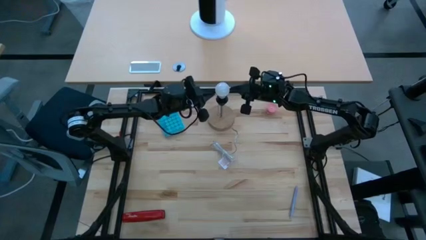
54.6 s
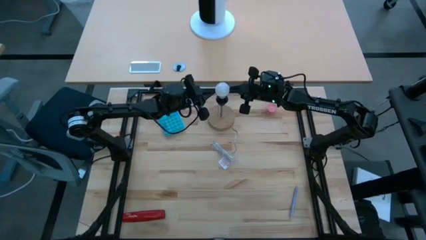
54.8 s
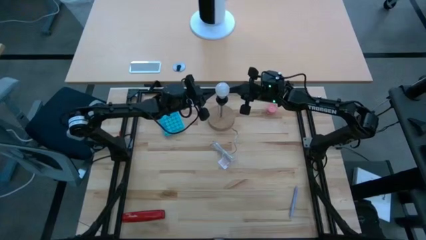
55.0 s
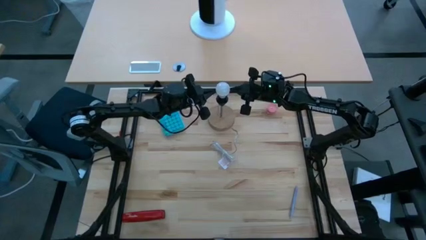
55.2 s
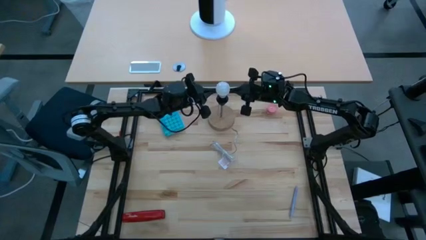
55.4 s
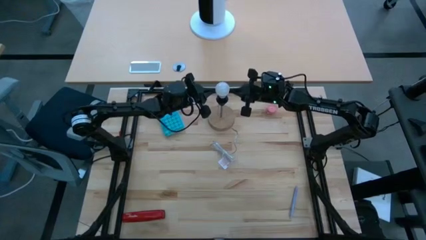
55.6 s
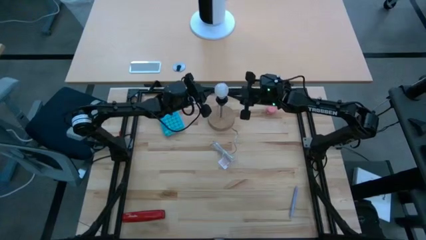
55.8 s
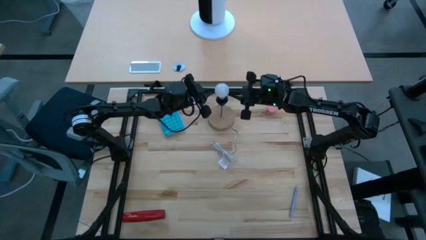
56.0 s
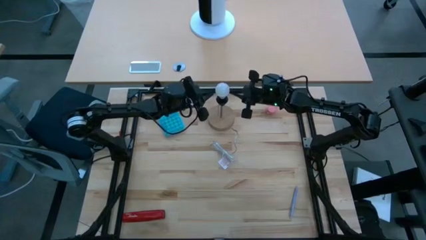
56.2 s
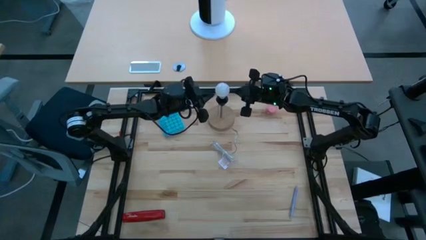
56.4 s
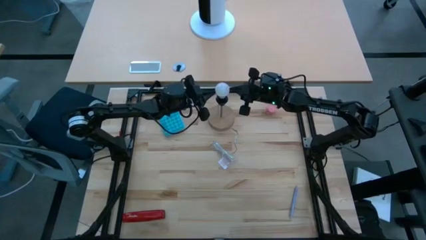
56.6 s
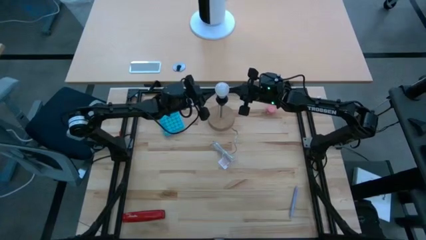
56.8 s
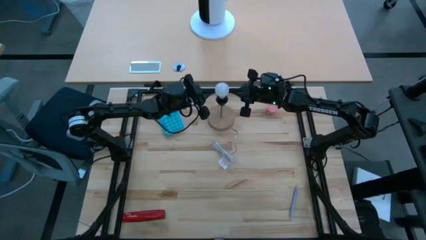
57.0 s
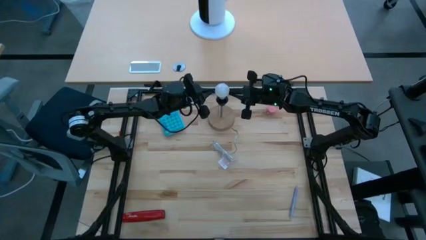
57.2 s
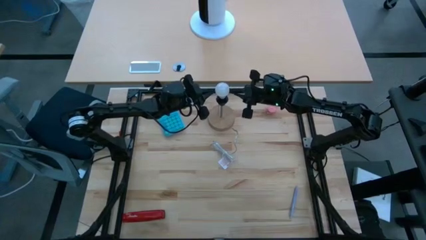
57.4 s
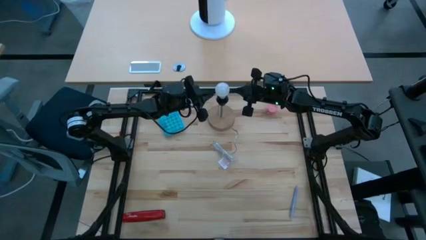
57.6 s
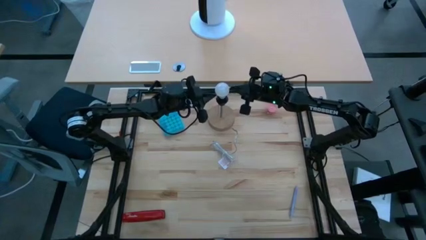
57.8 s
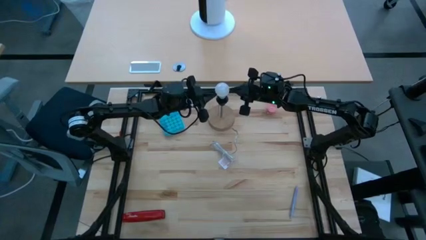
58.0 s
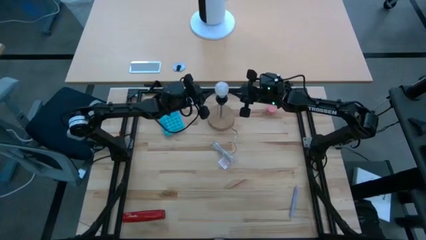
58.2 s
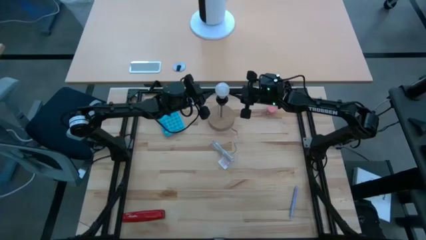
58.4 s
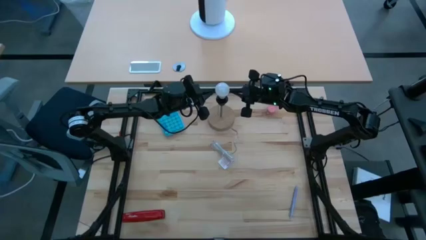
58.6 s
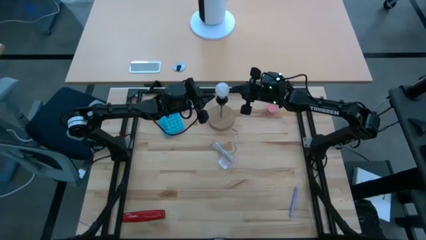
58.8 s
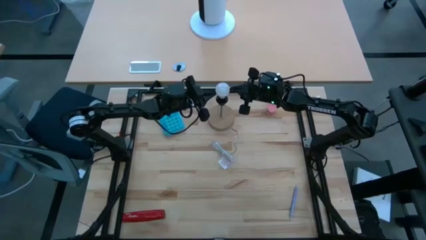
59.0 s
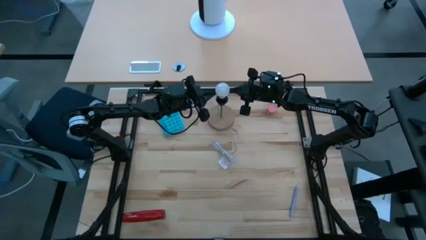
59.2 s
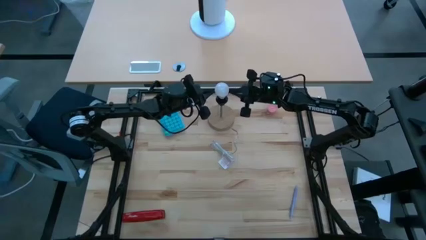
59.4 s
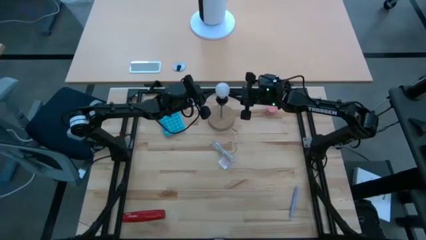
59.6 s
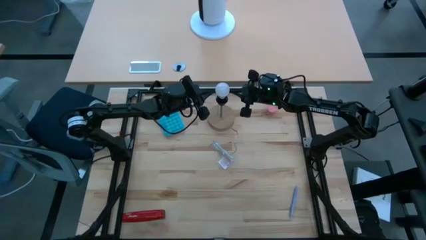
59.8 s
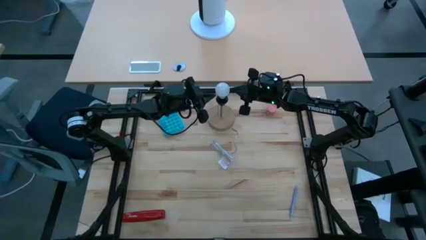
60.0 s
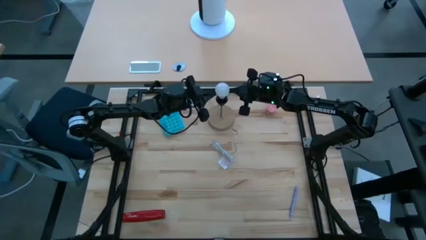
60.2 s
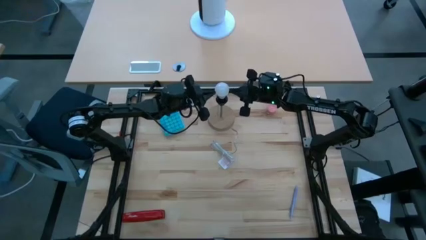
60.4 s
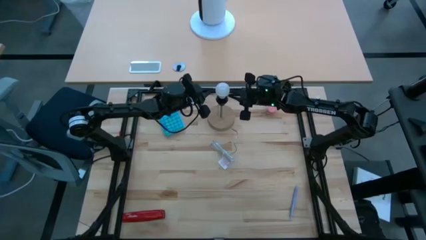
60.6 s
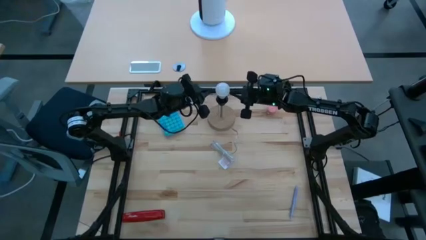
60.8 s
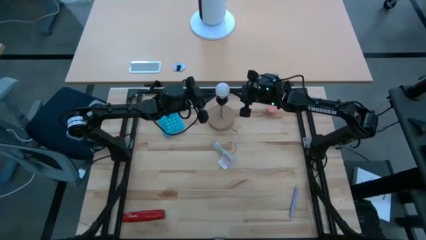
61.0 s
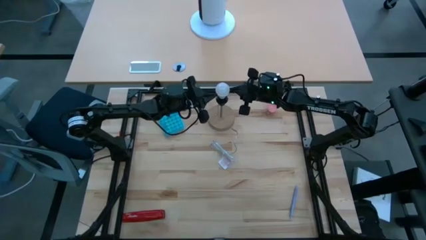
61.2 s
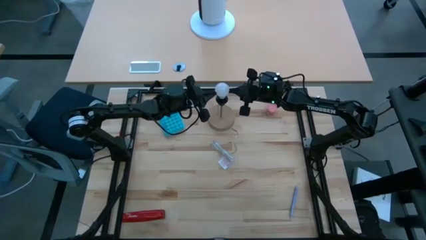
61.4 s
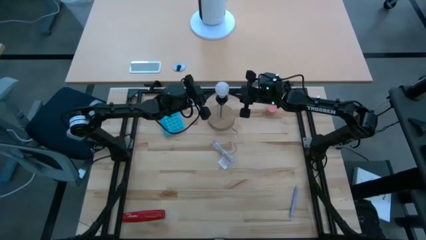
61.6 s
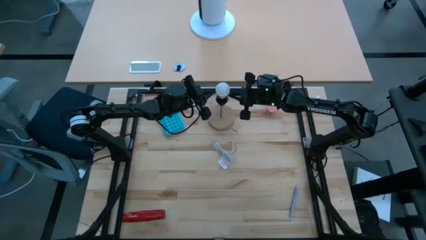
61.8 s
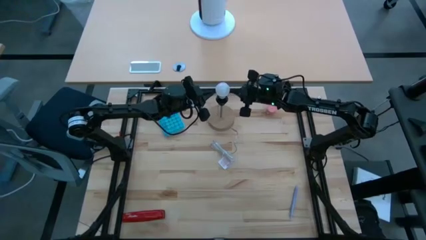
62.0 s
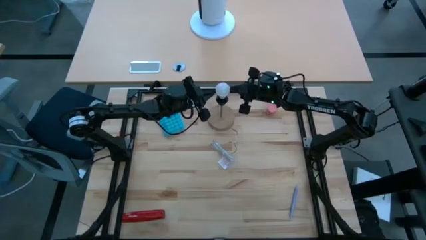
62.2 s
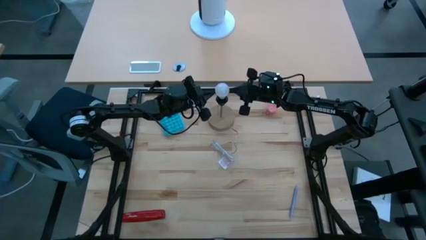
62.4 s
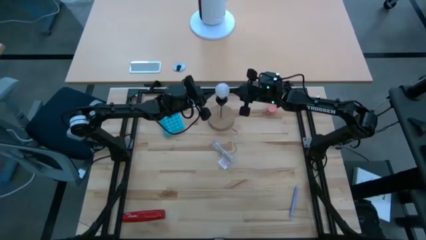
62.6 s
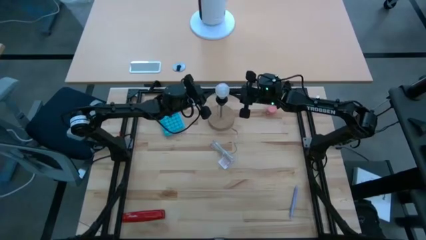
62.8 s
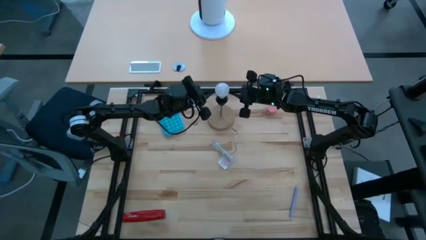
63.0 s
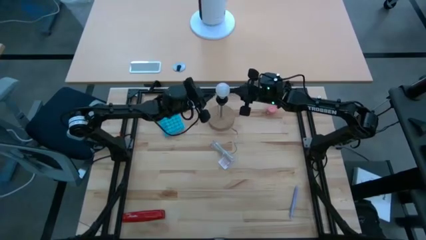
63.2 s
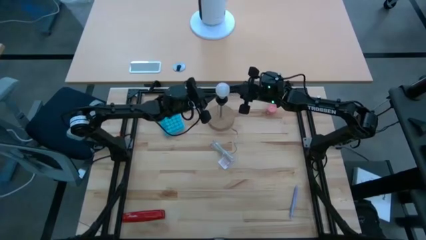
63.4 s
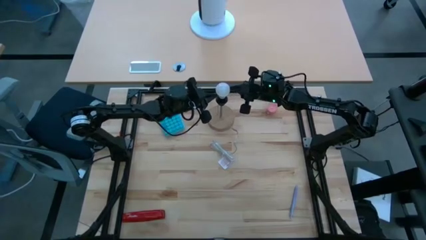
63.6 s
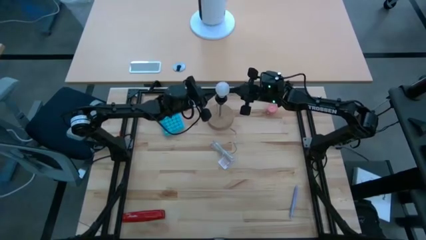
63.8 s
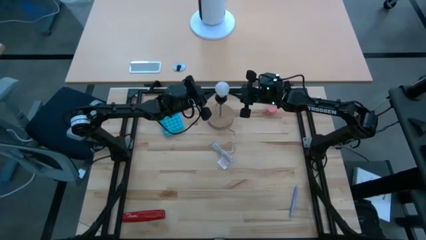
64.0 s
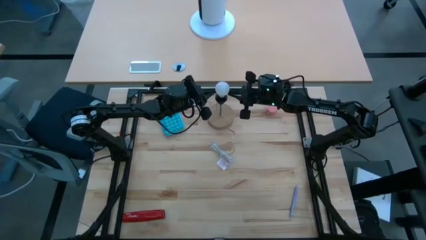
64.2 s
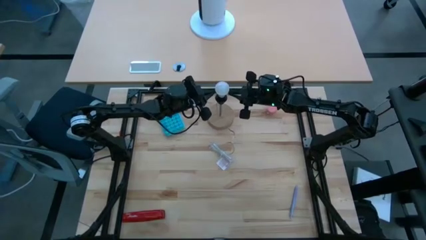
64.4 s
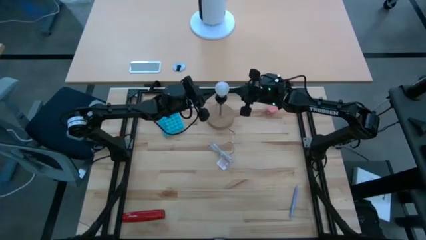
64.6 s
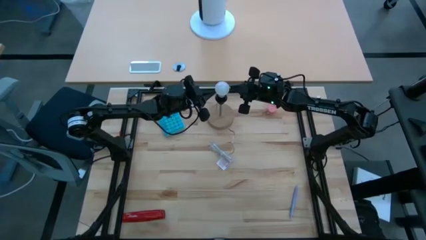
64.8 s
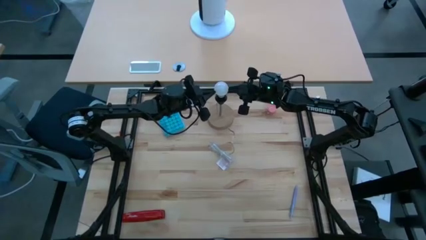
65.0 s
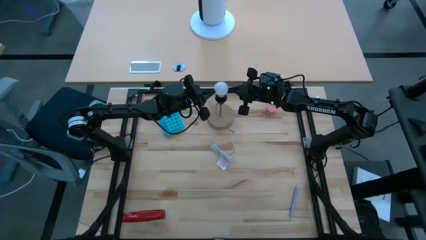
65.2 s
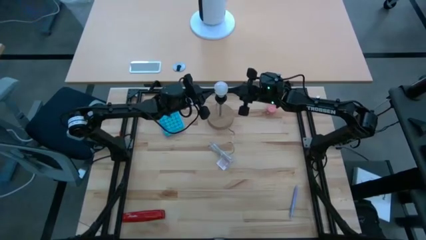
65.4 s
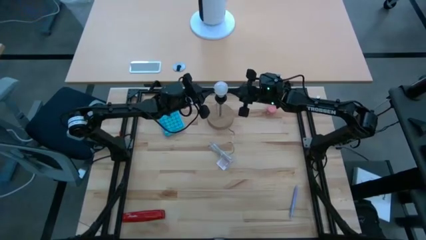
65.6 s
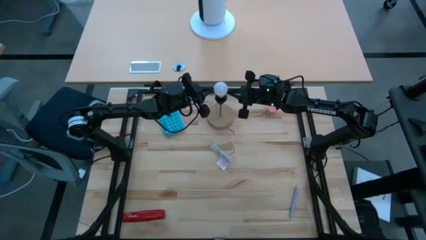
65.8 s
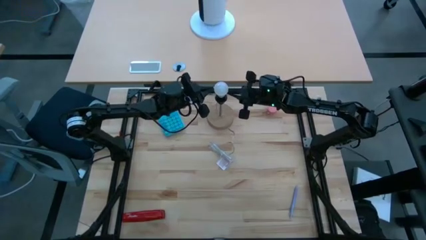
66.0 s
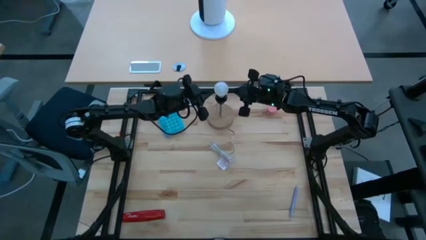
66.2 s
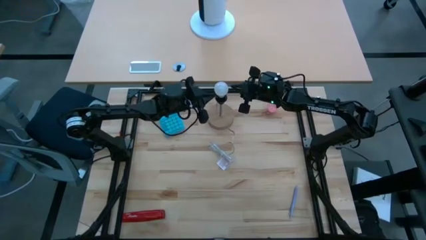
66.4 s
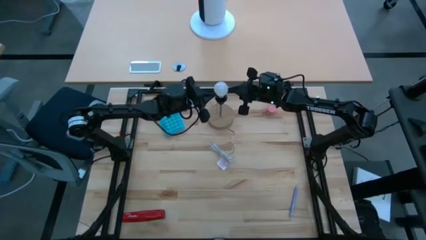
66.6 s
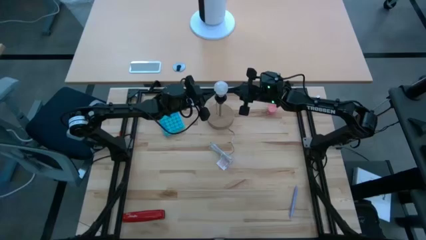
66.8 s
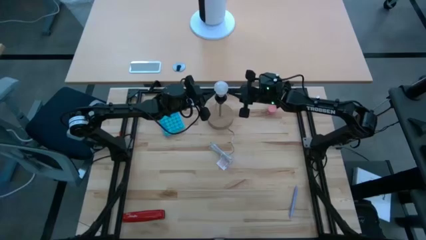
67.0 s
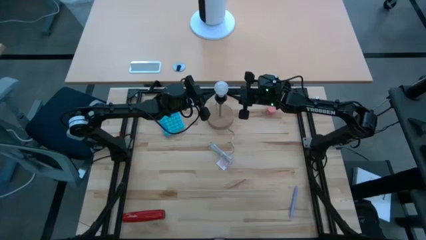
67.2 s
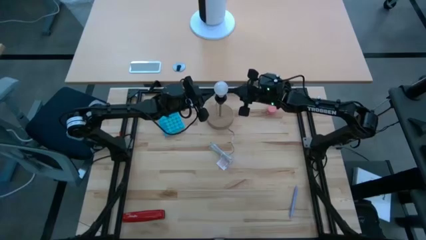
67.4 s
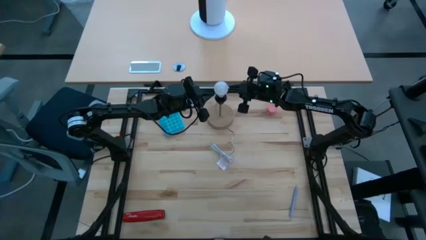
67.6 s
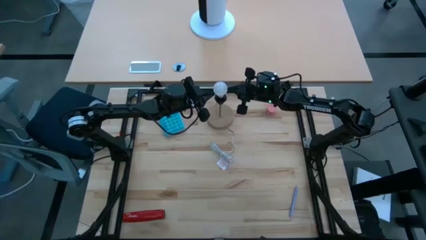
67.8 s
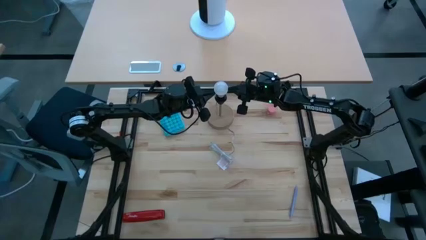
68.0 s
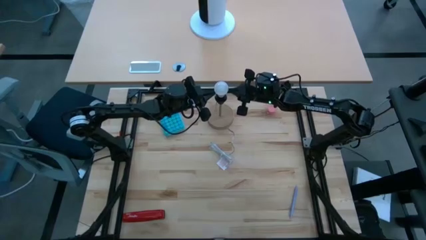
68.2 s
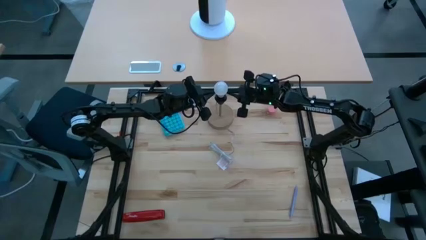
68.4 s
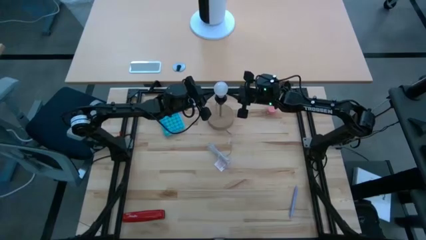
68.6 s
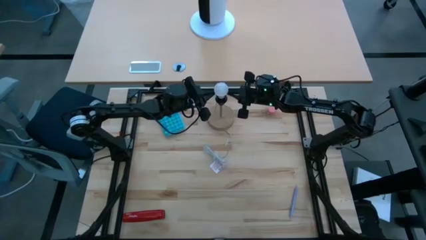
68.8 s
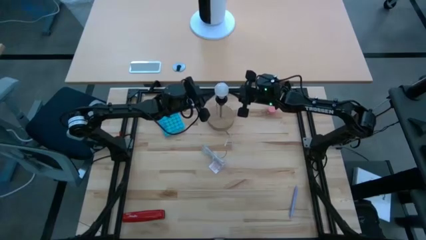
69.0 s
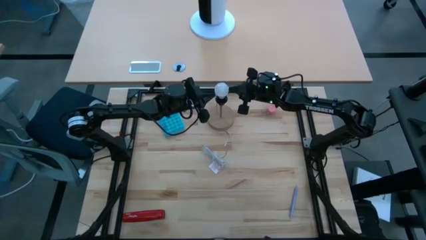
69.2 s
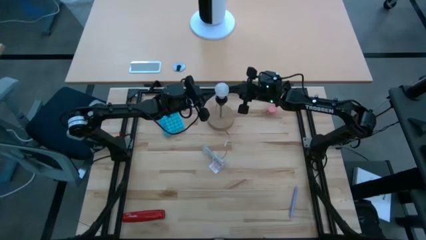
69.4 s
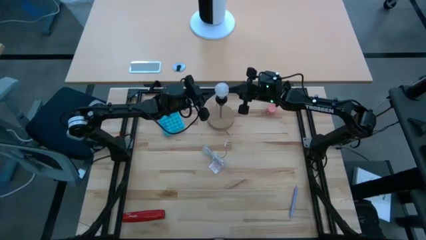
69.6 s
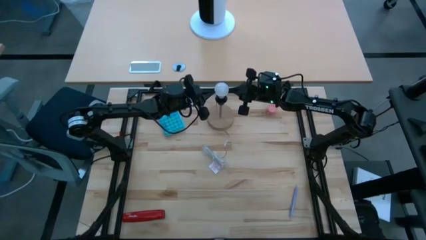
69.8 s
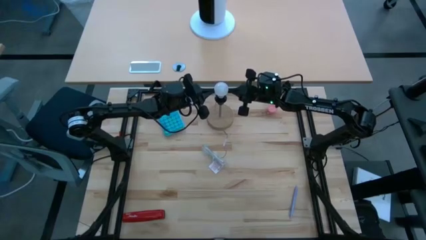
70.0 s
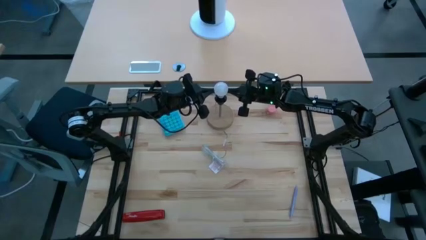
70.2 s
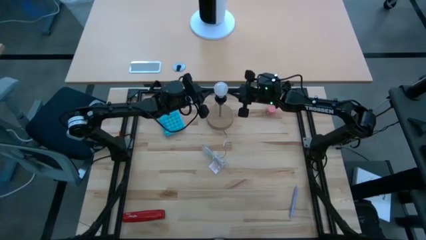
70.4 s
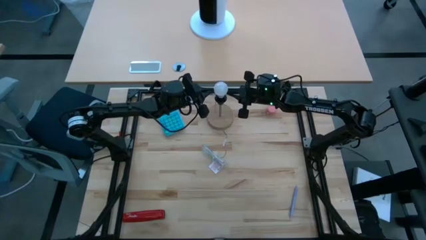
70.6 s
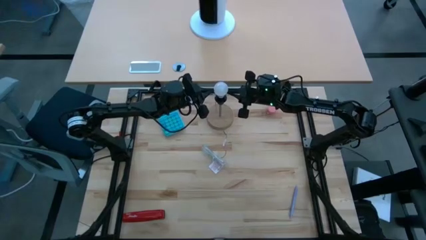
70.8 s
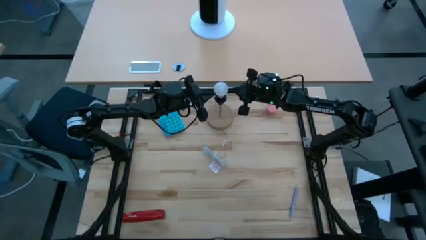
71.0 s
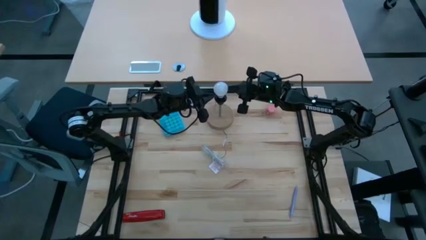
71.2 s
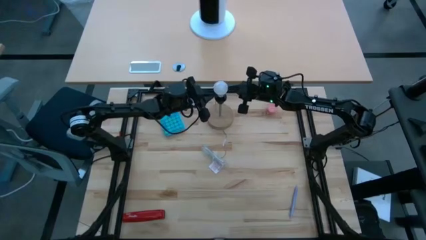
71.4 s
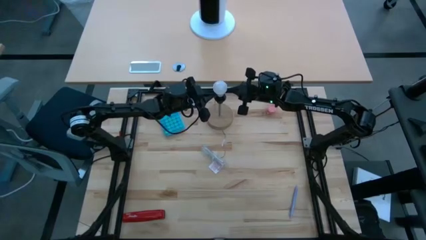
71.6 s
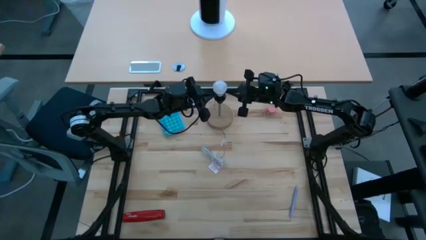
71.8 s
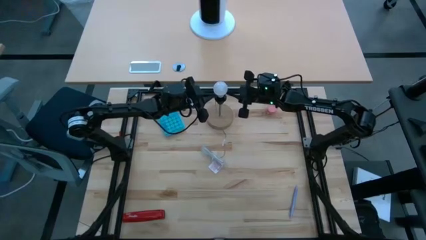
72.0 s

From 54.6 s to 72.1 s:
Task: Screw lightbulb
Insert the light bulb into the desk lamp
